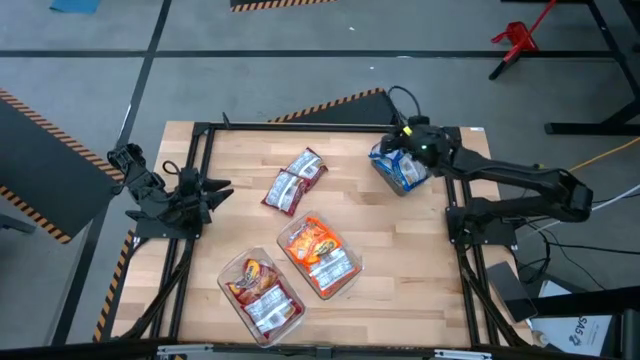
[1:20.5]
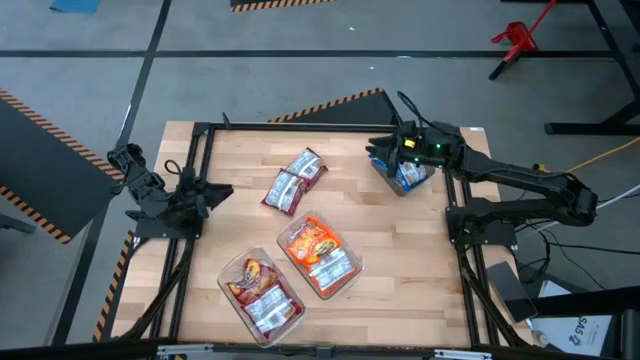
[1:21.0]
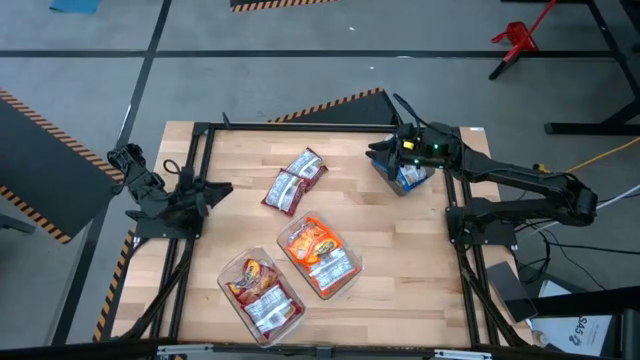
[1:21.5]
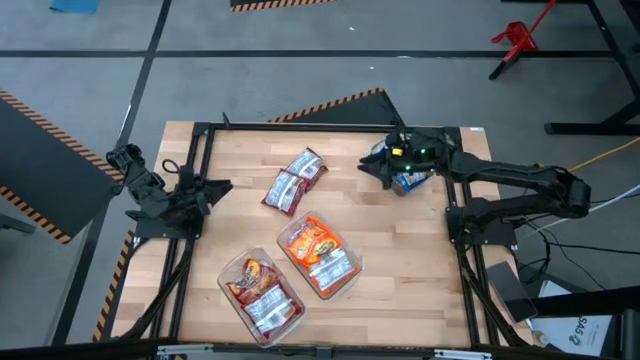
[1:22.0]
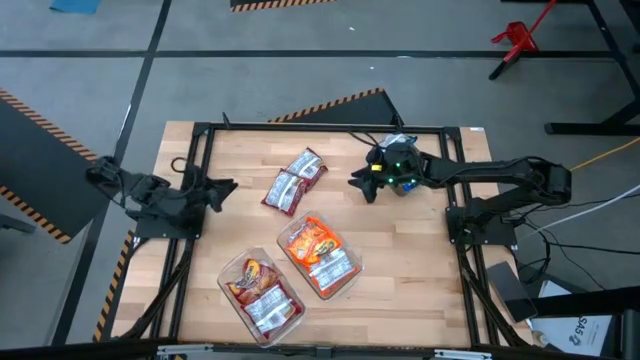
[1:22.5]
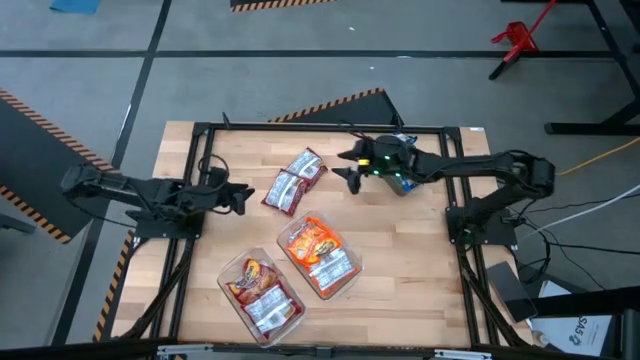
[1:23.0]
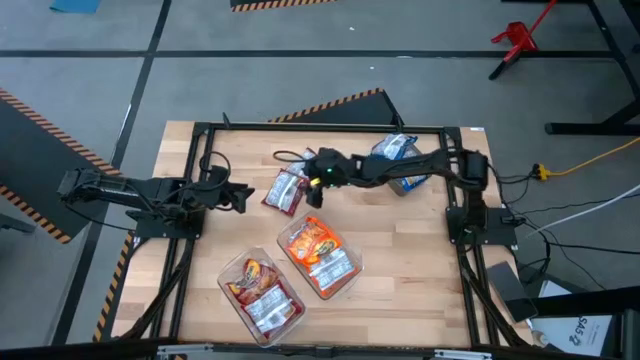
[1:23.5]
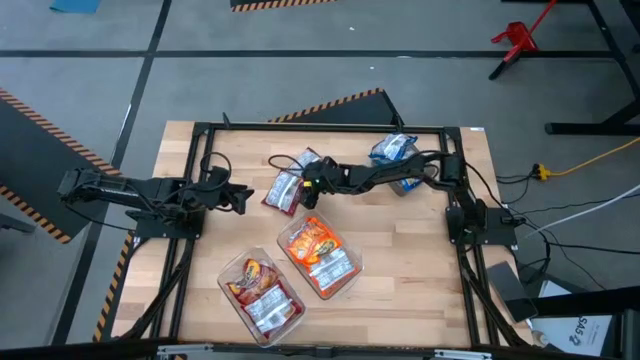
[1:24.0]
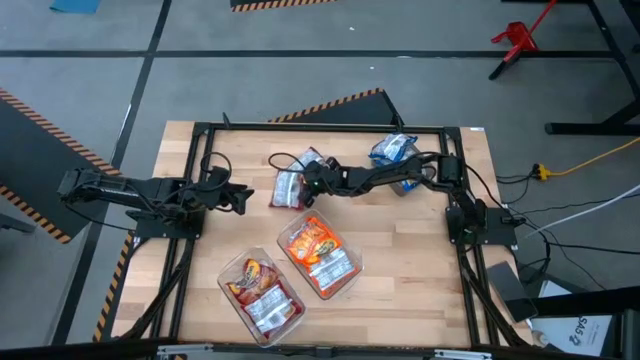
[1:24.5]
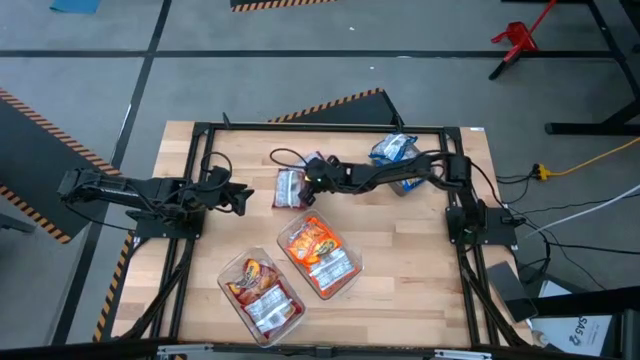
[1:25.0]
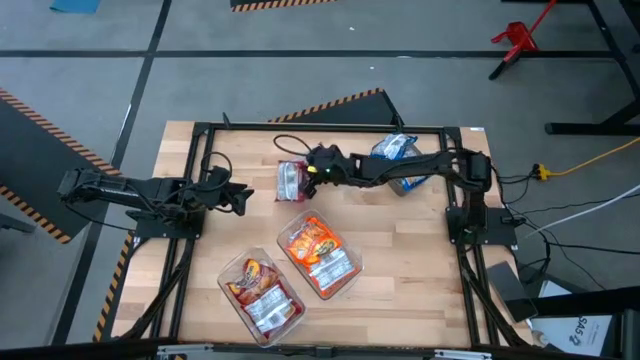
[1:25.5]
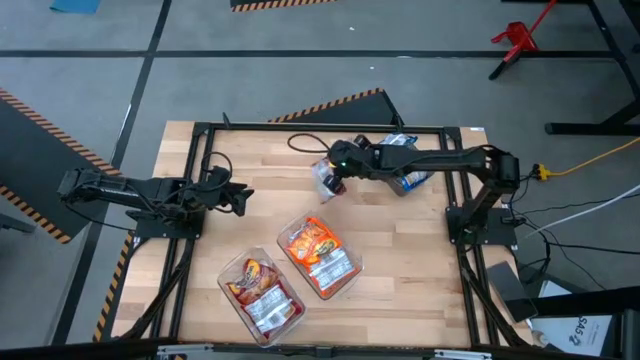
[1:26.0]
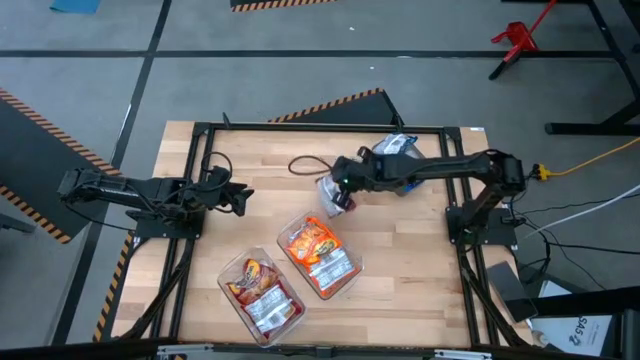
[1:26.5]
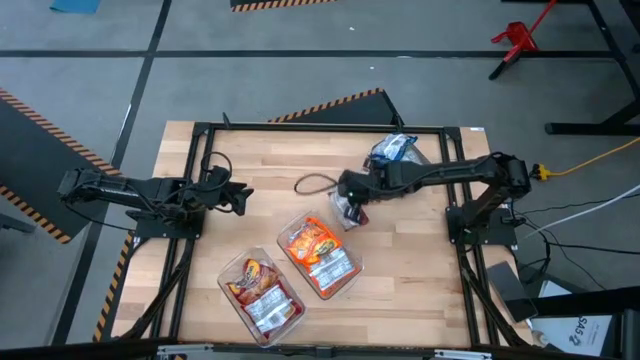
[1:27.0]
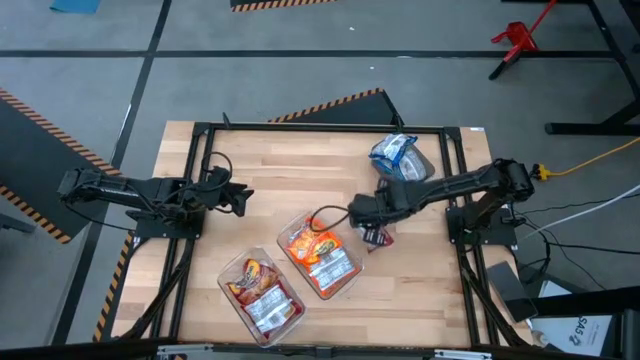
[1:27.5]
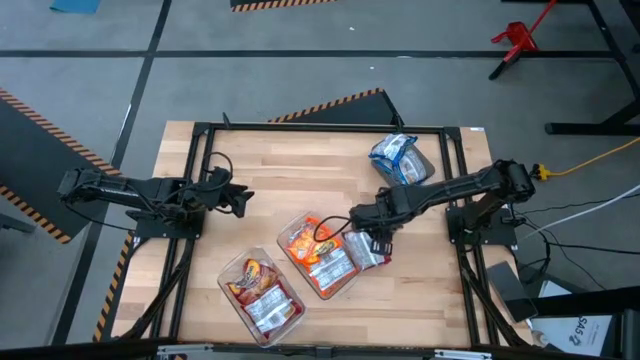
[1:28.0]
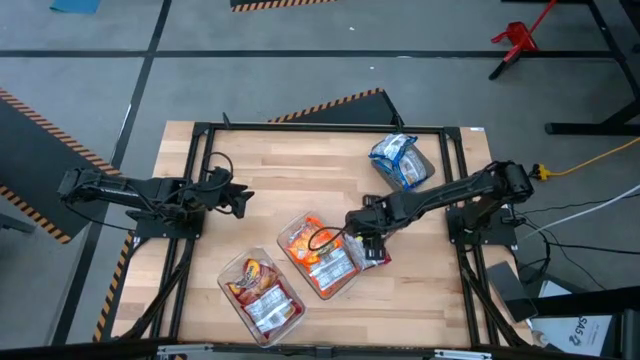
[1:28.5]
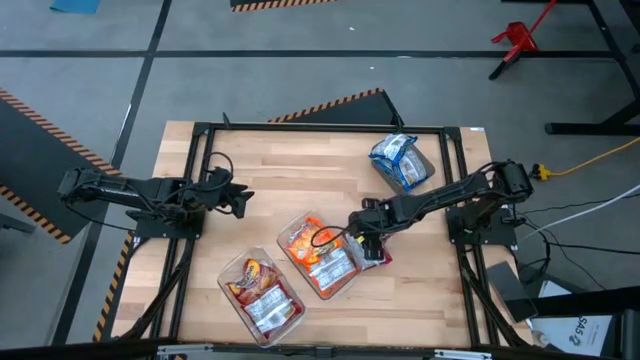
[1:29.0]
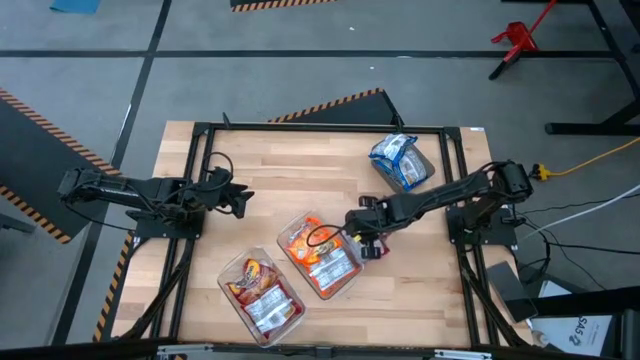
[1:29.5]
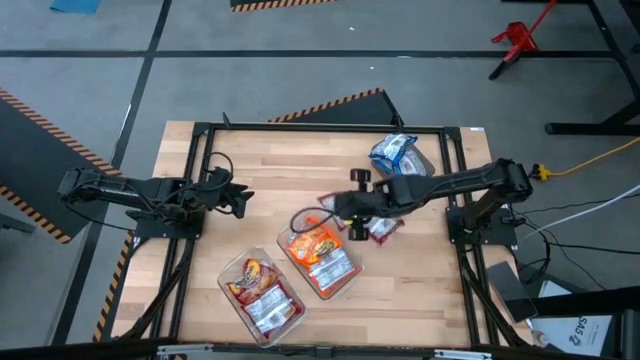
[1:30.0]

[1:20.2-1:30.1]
Task: Sort Maruchan noodles
Put the red noodle pack into the bottom transparent bin

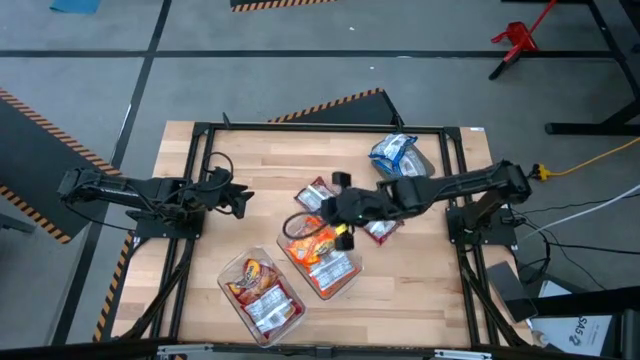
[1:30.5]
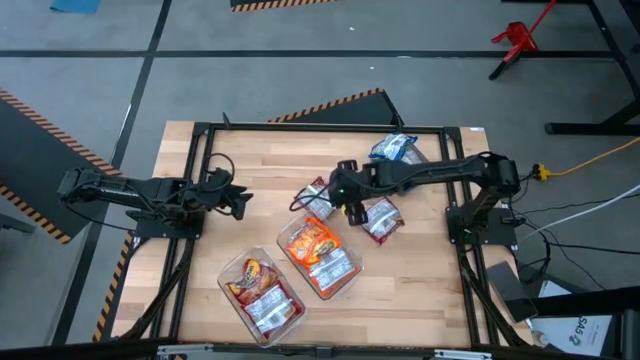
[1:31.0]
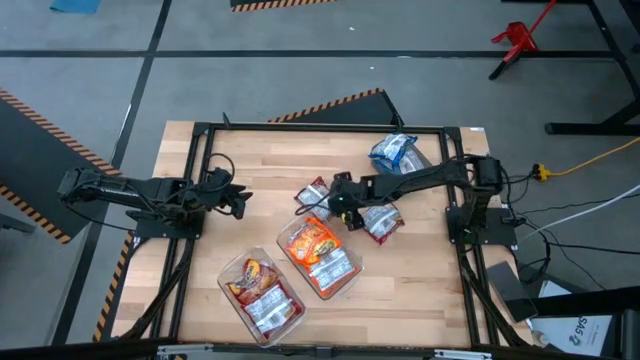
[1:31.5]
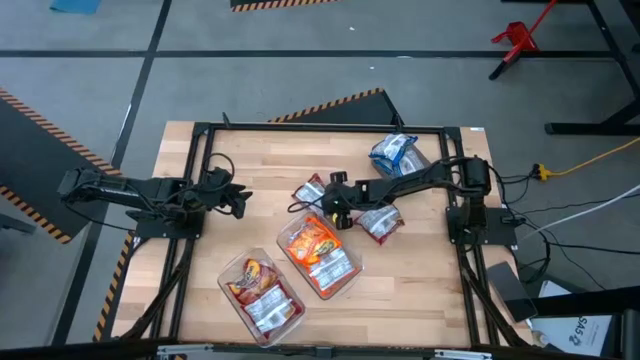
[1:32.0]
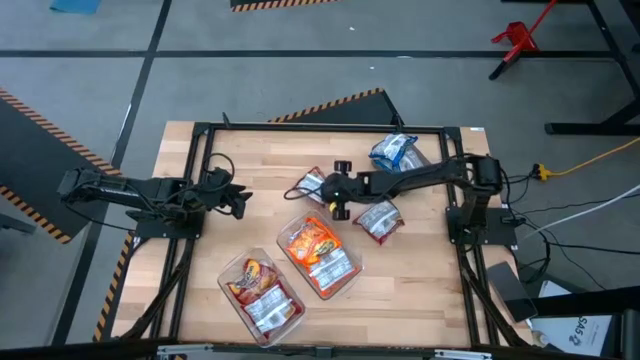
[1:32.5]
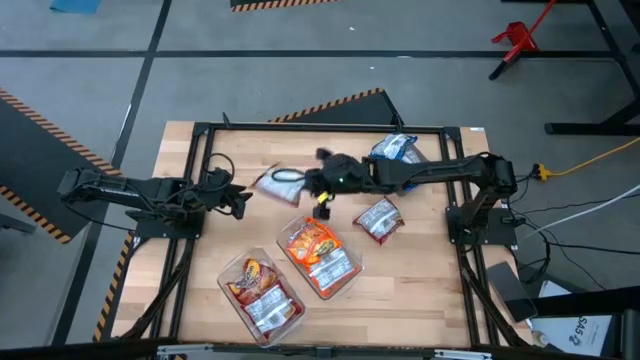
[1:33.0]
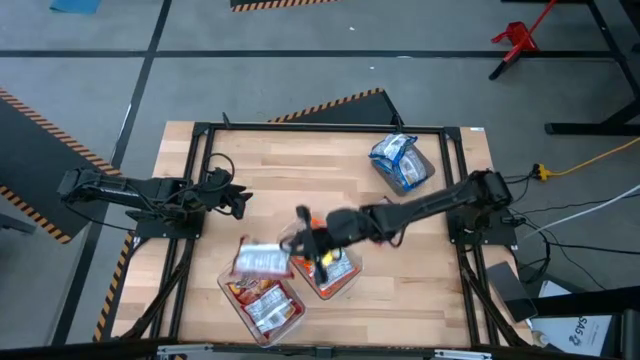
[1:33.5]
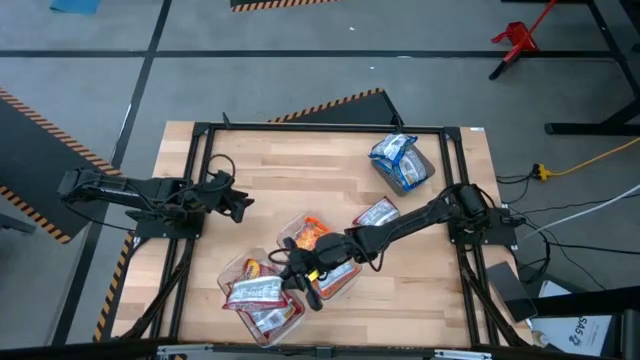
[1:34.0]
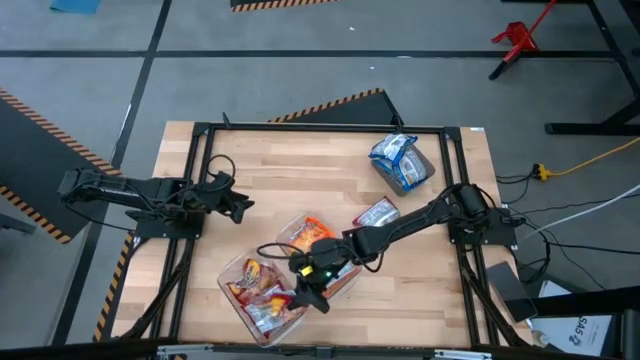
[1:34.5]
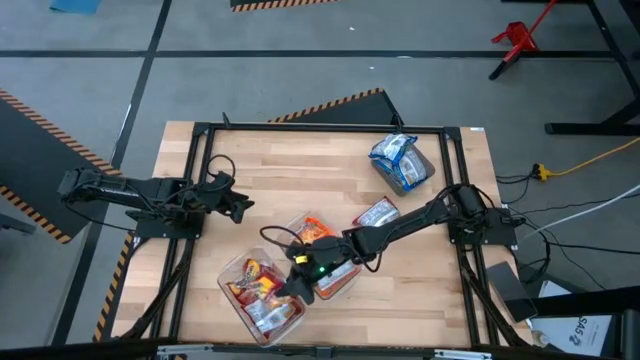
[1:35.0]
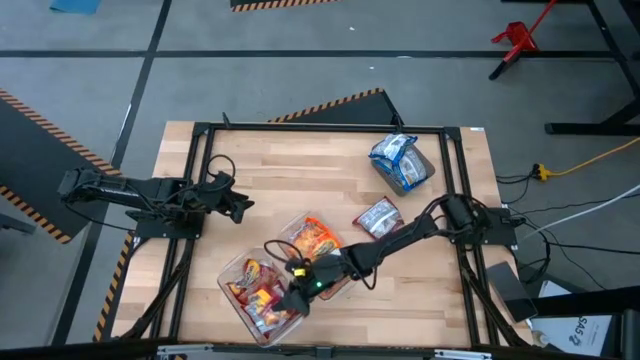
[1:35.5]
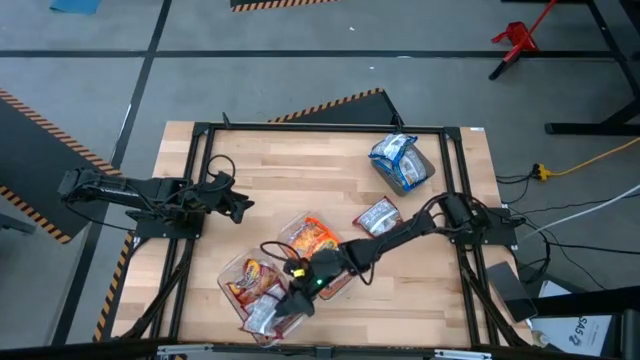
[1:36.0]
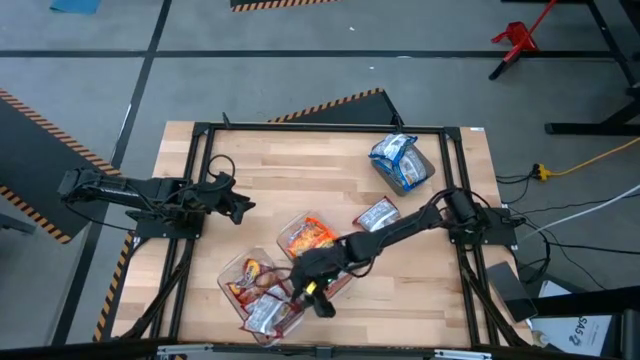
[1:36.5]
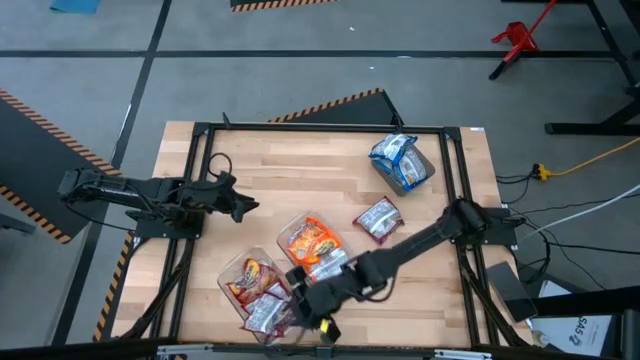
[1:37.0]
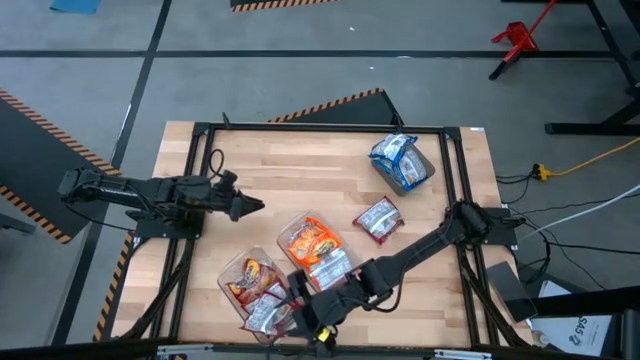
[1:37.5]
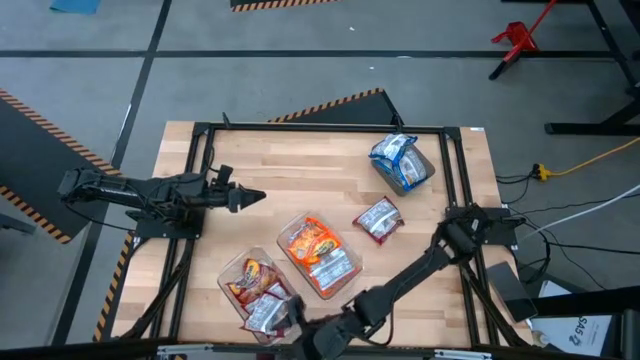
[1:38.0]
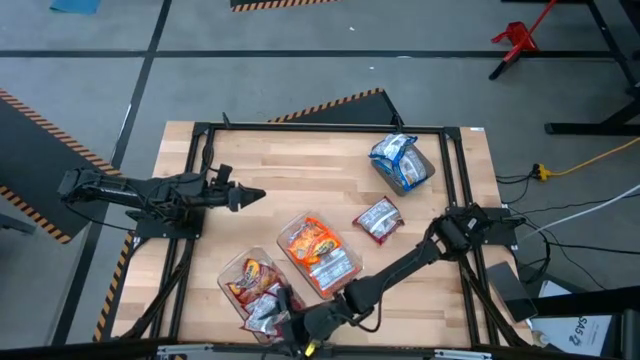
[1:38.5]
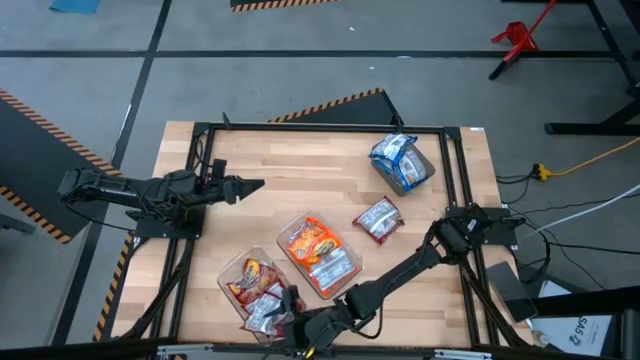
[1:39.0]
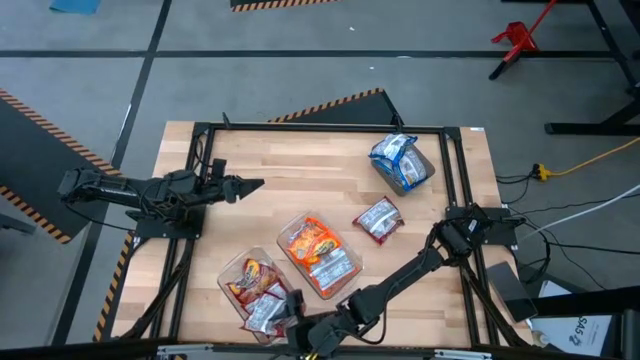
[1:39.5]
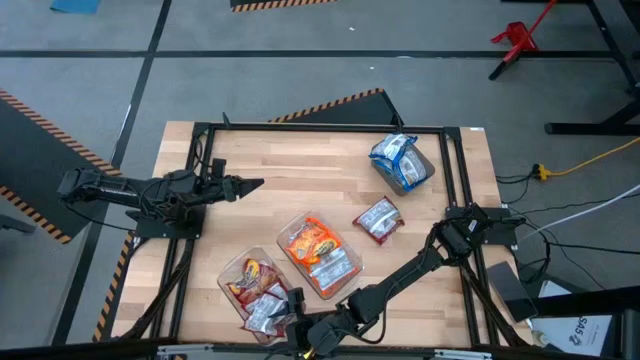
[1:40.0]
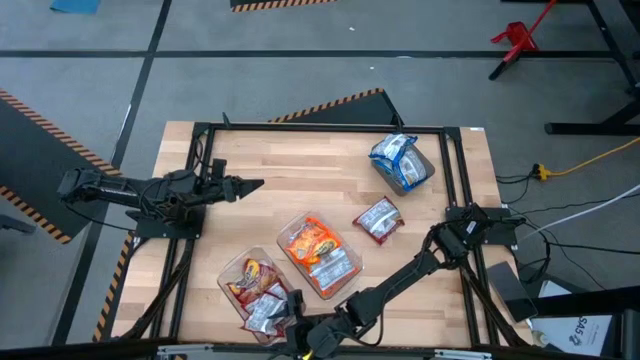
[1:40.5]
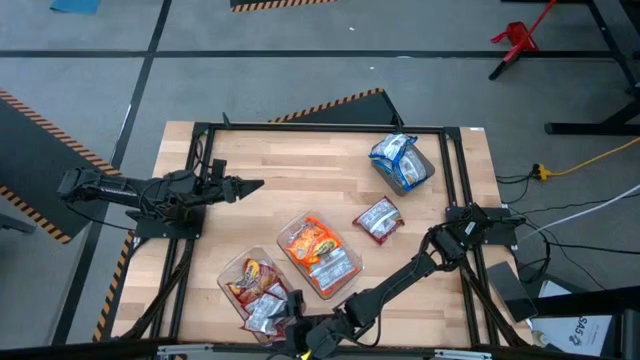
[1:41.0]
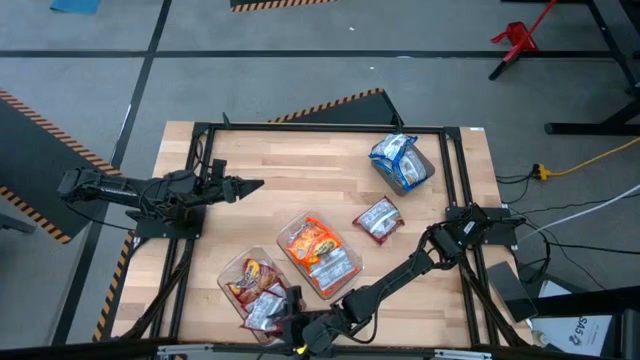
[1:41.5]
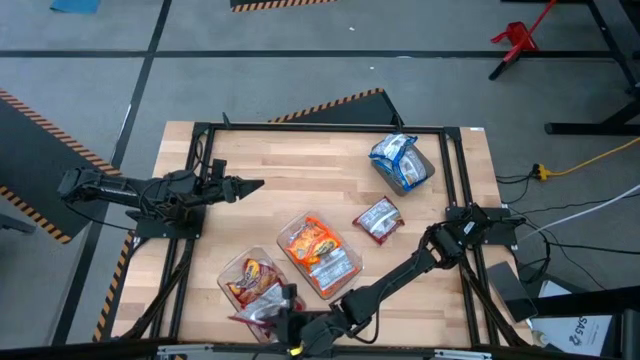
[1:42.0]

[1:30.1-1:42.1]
Put the red noodle pack into the bottom transparent bin
